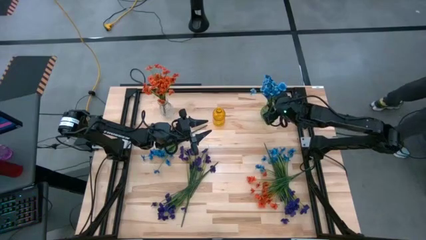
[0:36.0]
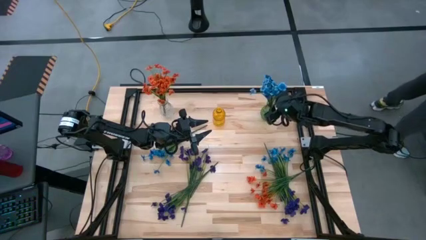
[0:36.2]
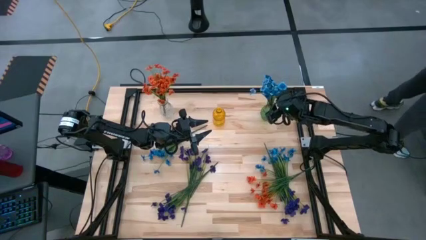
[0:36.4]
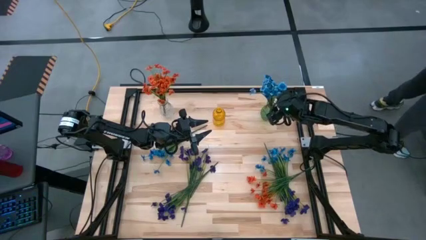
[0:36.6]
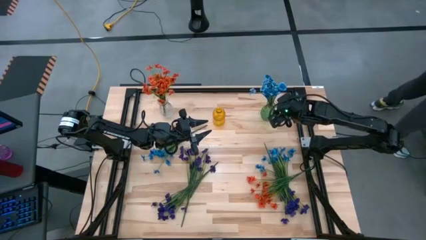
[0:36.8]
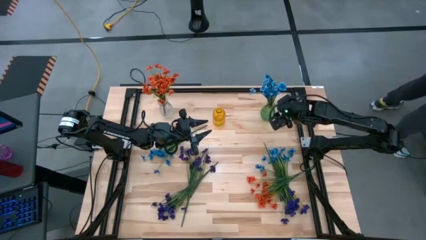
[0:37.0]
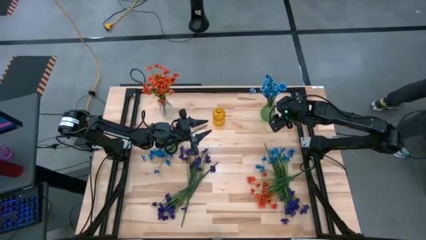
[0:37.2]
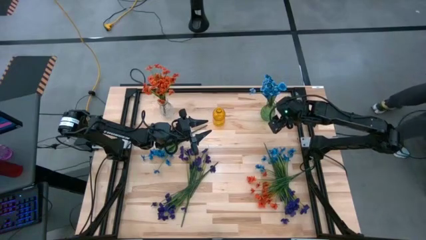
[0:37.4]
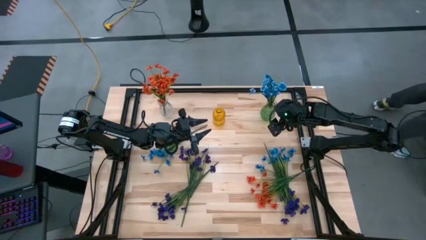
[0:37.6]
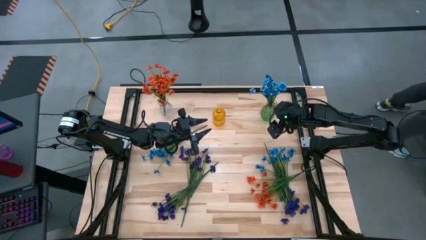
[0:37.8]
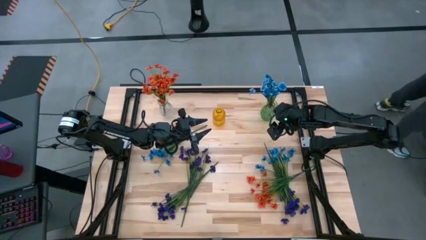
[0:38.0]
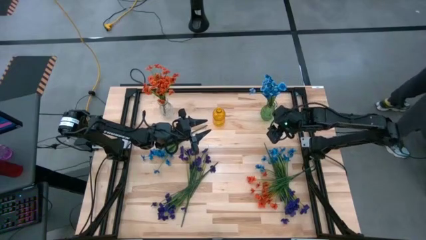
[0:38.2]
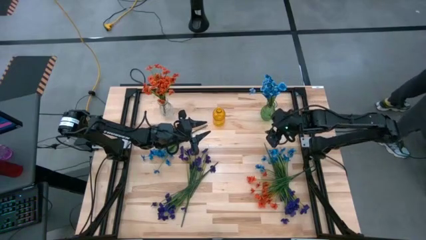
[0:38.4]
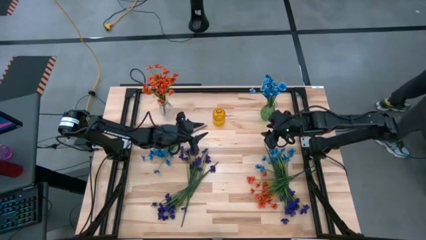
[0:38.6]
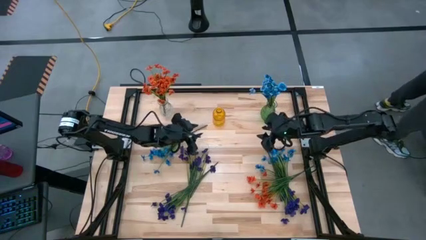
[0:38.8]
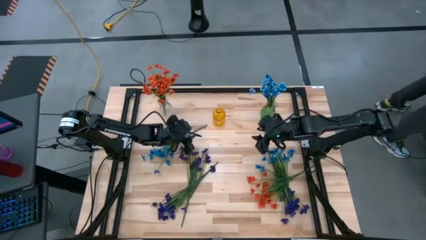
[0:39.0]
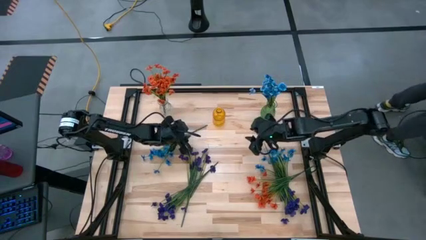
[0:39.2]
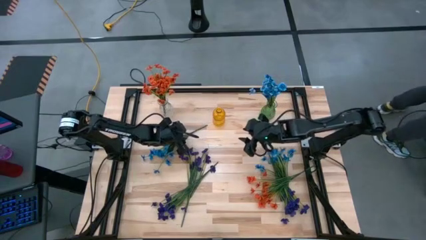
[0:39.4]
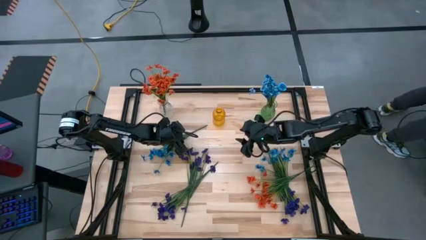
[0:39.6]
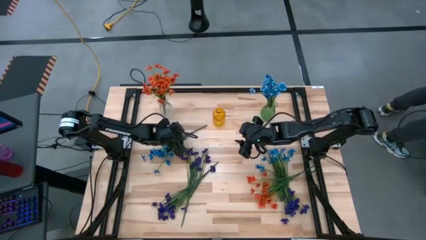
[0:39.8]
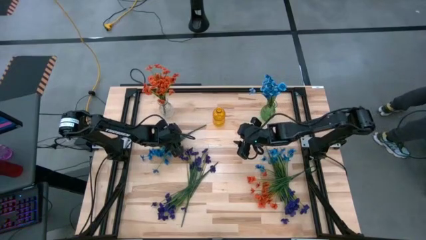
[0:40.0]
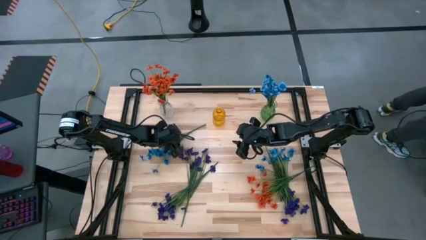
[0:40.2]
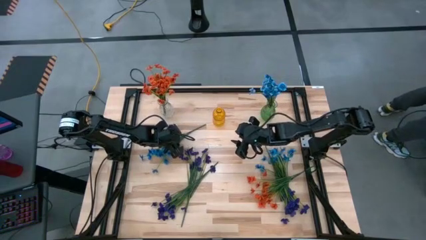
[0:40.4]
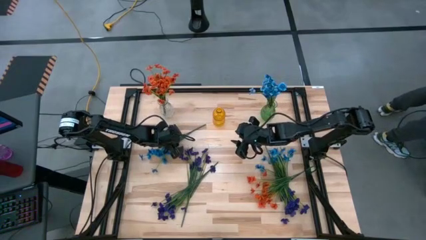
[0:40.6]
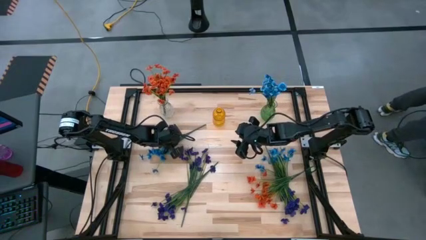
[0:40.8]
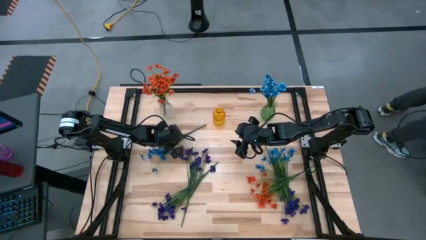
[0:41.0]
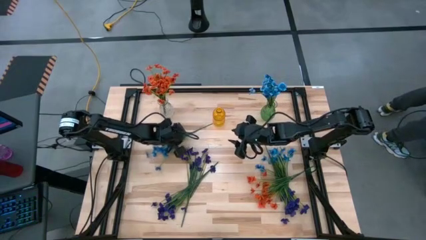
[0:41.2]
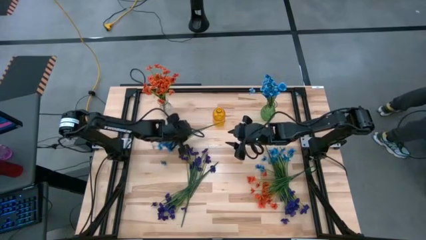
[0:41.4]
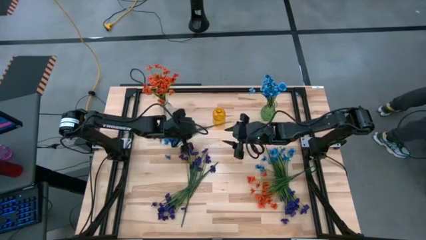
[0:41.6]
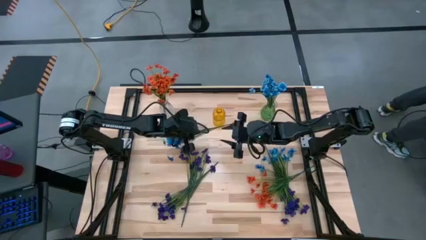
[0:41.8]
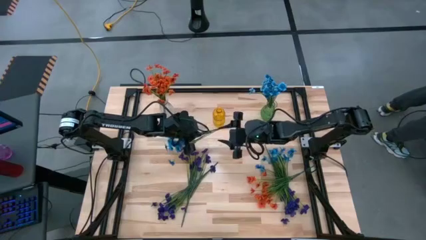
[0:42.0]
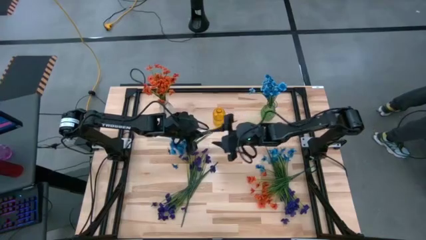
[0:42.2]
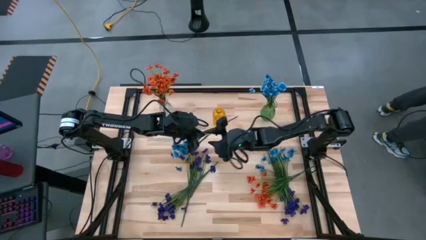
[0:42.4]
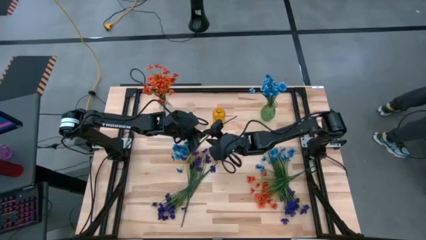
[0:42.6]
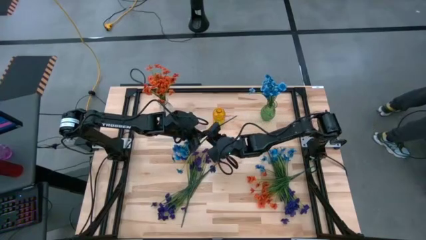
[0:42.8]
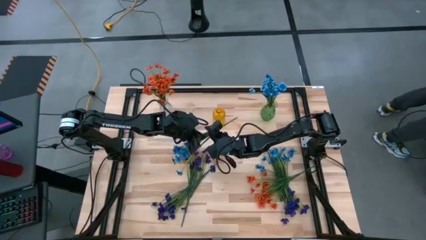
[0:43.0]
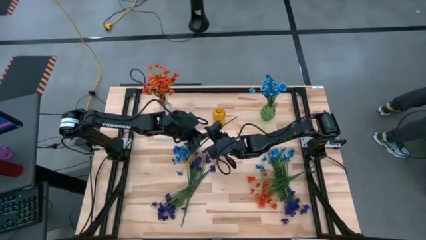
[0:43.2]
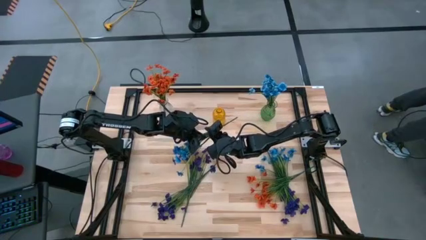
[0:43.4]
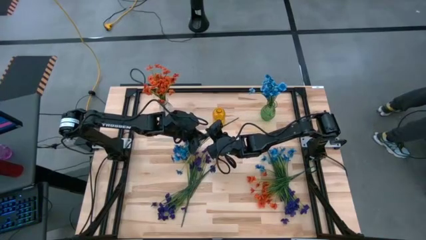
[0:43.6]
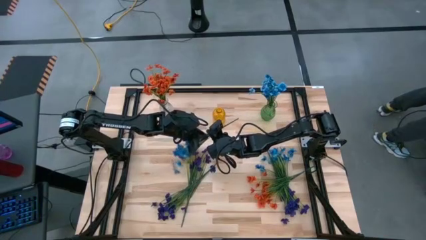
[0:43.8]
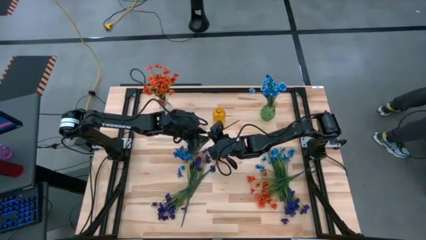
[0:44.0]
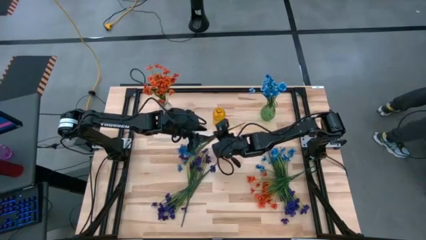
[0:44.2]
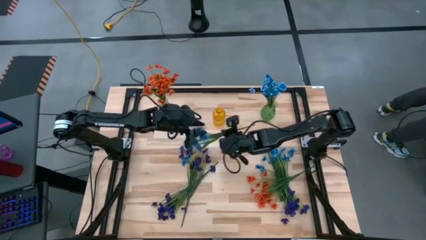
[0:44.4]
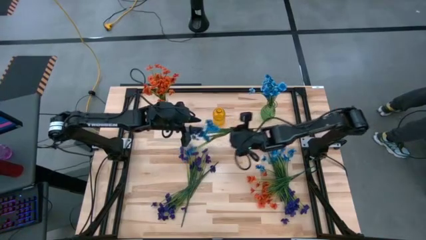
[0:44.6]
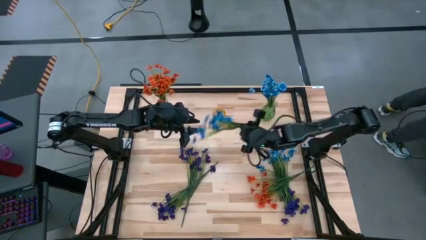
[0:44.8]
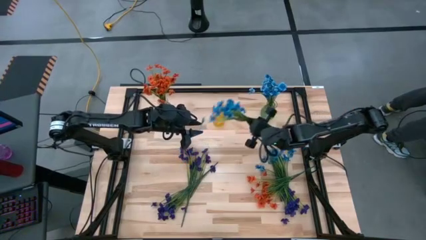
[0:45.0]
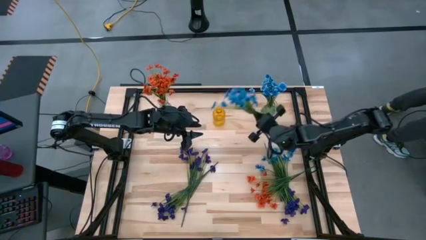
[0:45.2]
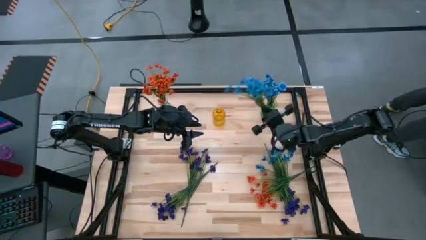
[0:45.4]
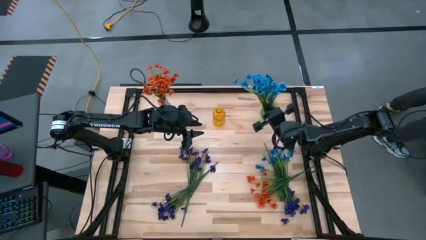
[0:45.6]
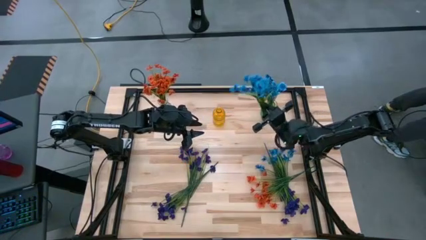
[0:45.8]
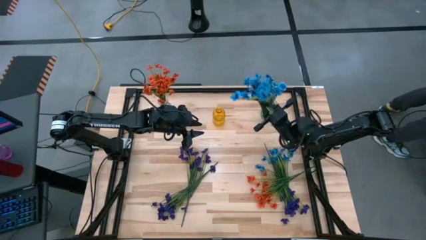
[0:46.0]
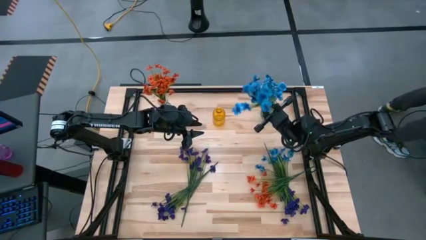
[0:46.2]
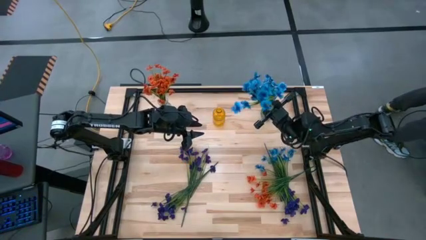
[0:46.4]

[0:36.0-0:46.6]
Task: Sort flowers into vase by color
Put the left blue flower into the green vase
